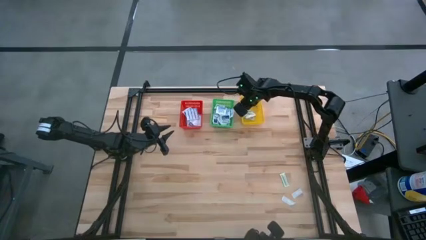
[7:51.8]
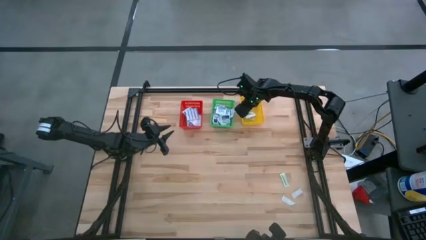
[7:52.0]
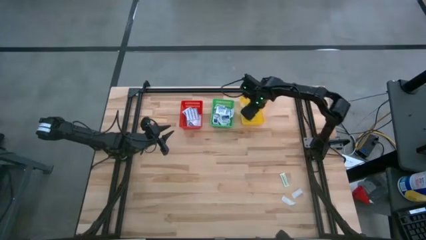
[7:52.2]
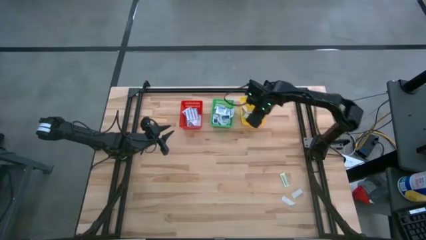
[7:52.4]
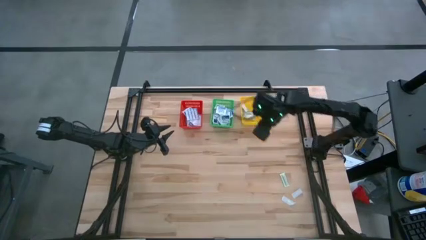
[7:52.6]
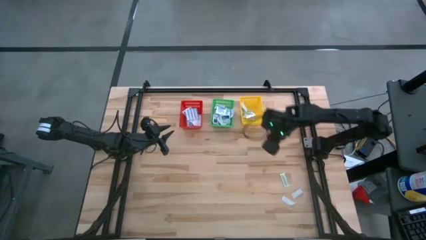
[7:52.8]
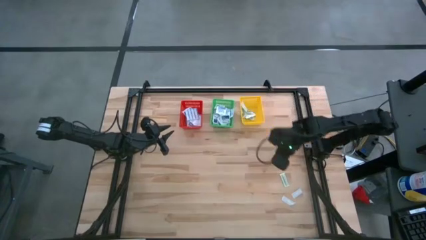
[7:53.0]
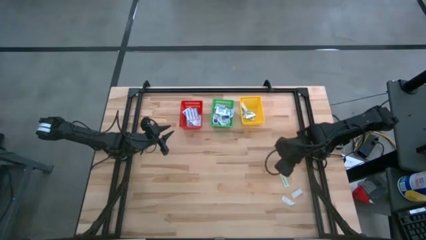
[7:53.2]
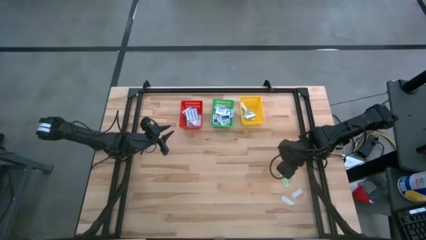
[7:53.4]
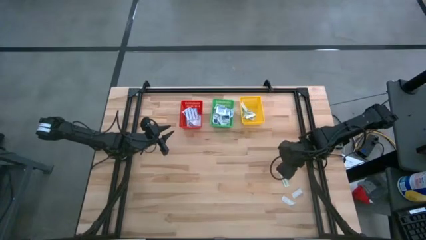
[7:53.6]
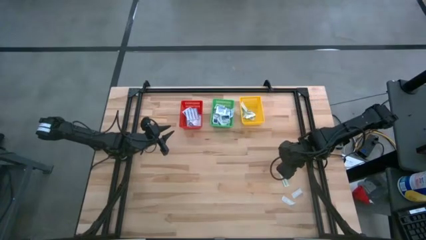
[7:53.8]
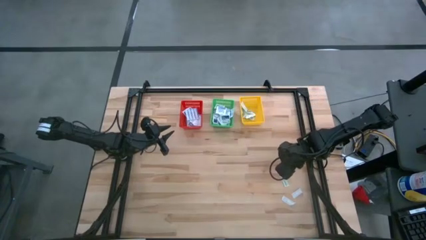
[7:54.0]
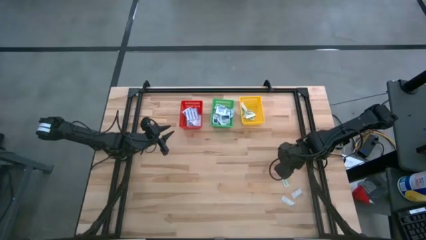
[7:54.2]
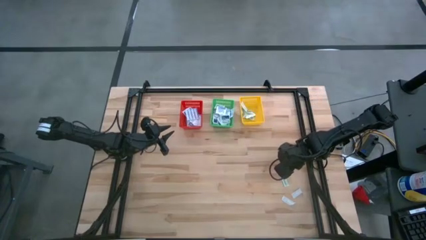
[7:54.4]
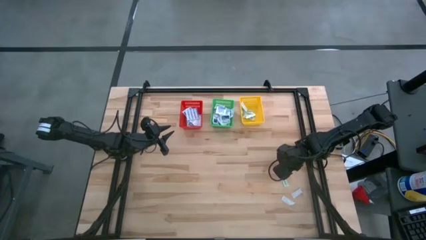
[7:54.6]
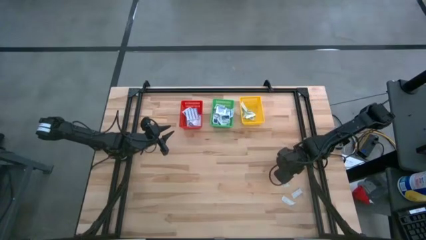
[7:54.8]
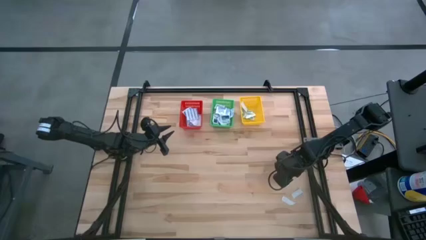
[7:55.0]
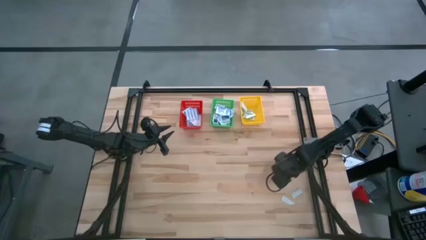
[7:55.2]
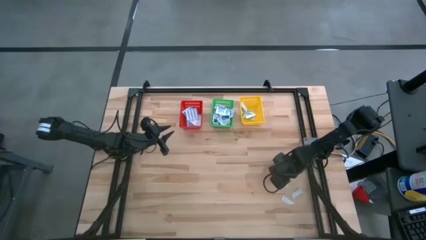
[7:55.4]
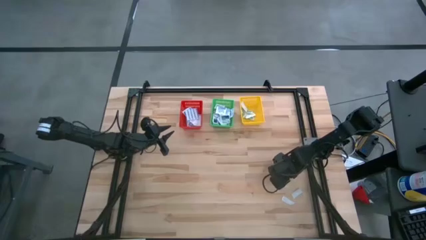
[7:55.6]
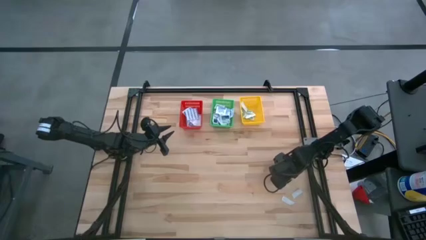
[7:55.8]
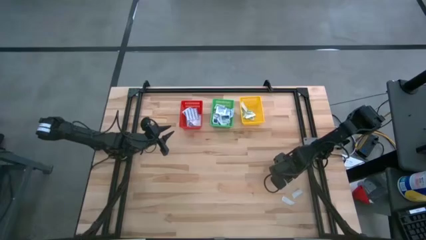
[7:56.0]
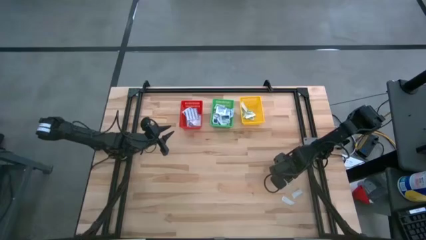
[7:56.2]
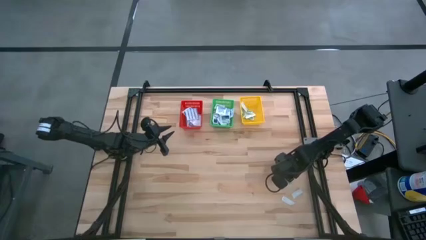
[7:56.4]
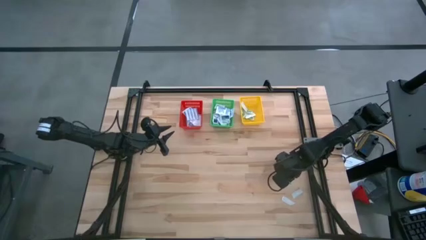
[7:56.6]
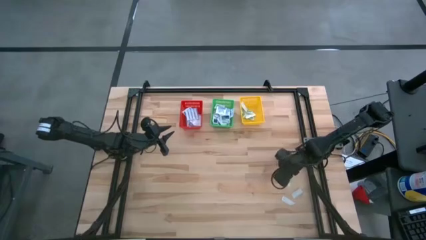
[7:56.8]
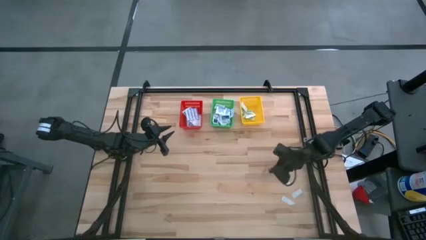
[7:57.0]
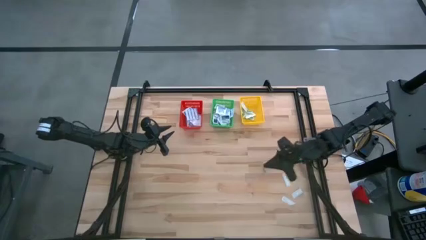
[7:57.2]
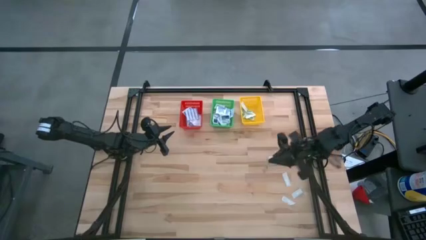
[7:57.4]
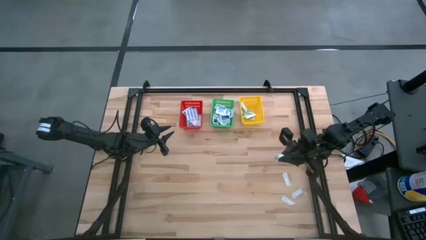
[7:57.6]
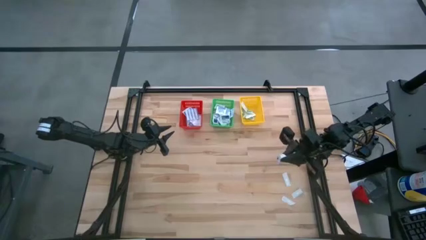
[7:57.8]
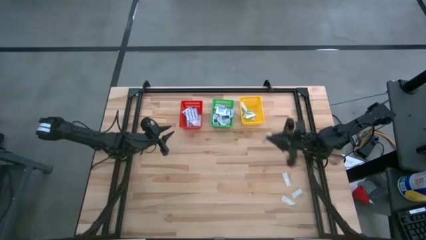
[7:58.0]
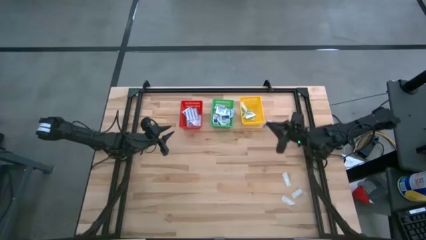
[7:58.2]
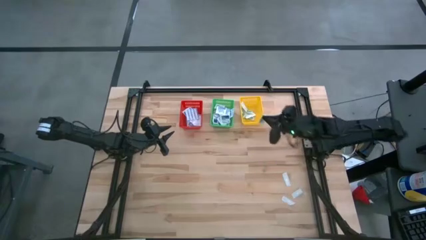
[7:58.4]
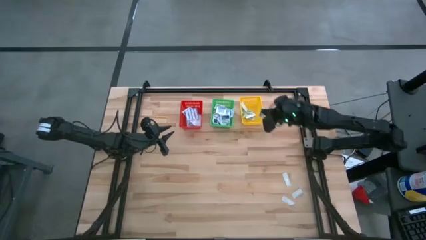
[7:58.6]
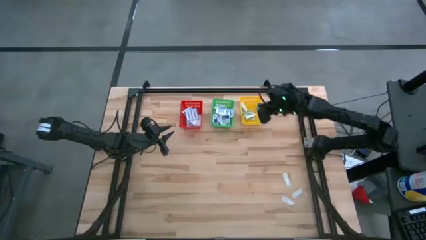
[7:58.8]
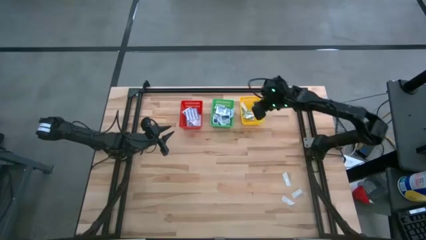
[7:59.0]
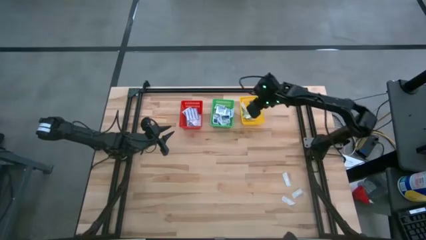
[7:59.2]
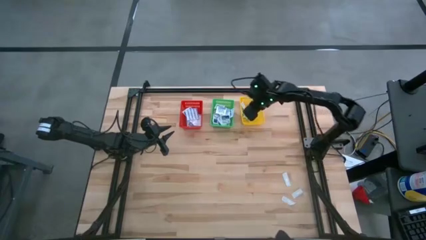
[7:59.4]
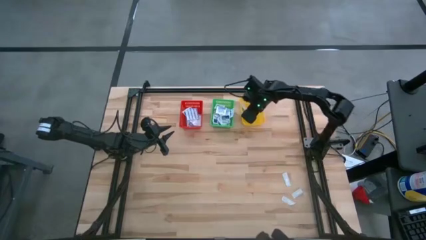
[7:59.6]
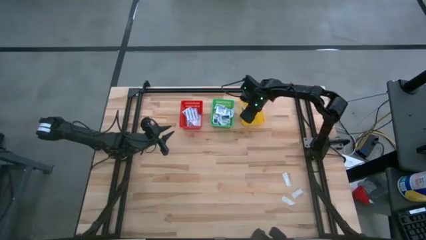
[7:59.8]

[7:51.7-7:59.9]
Task: Pick & Place First Aid Supplies
Put the green bandage into the yellow basket

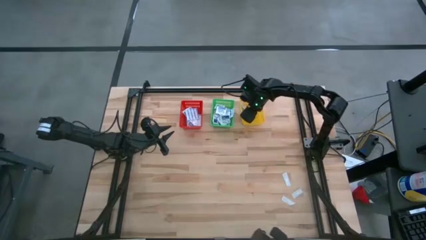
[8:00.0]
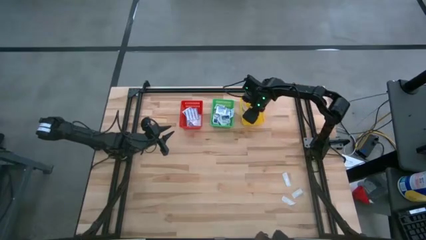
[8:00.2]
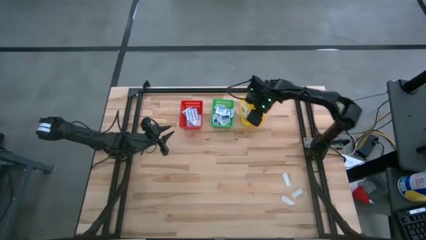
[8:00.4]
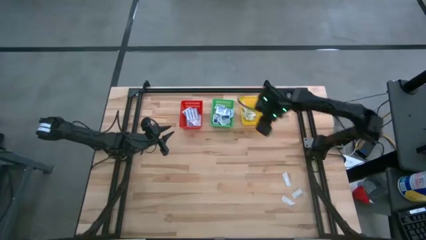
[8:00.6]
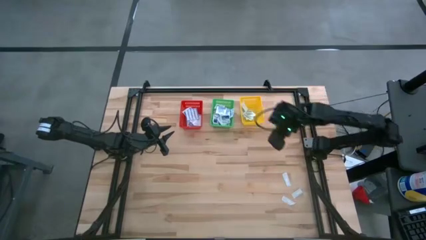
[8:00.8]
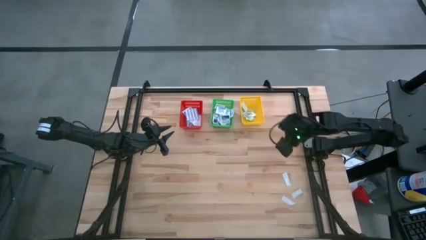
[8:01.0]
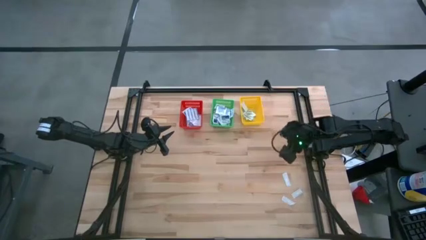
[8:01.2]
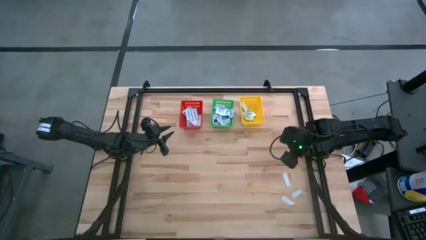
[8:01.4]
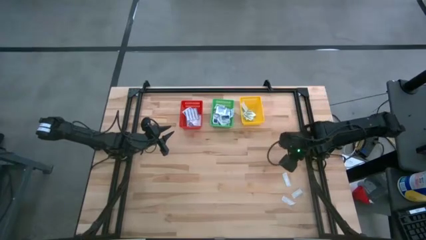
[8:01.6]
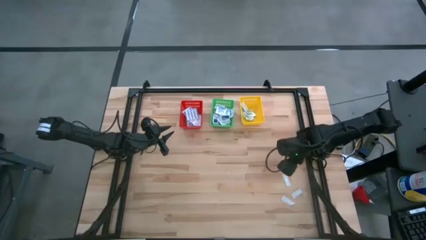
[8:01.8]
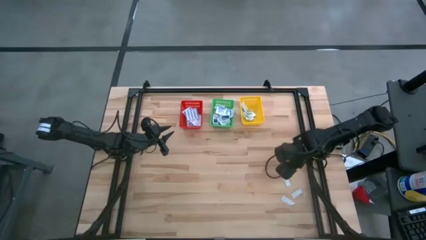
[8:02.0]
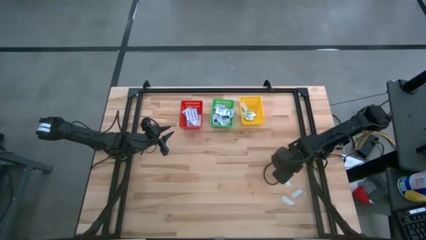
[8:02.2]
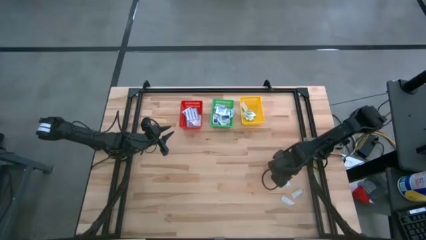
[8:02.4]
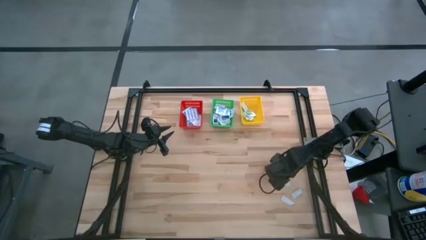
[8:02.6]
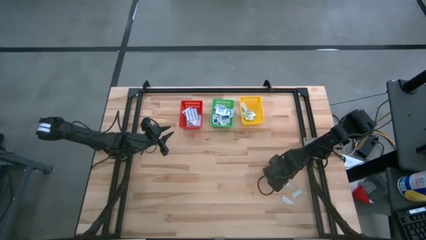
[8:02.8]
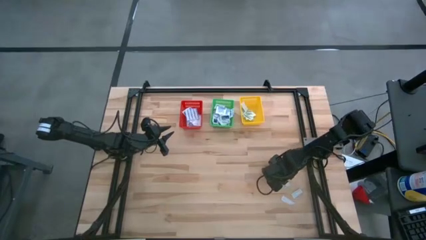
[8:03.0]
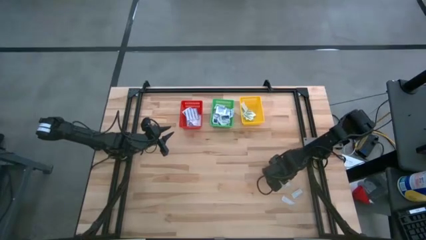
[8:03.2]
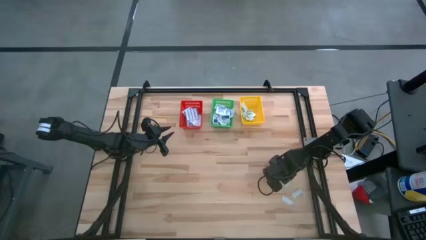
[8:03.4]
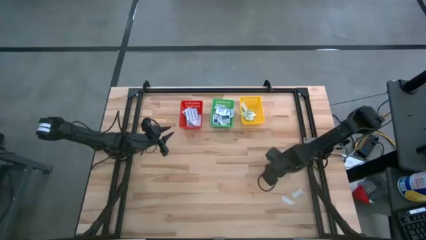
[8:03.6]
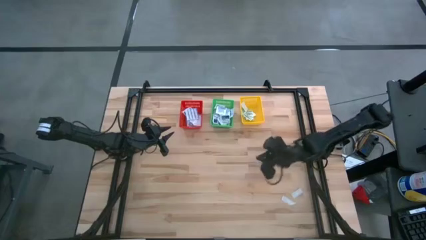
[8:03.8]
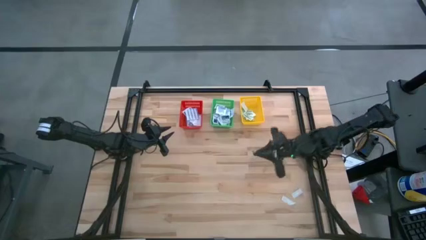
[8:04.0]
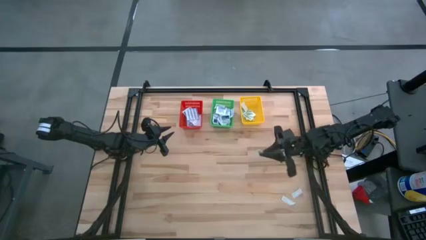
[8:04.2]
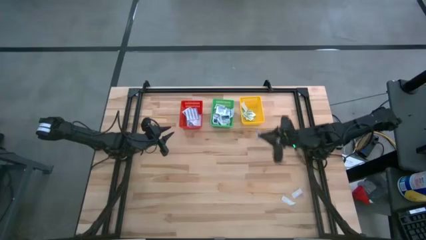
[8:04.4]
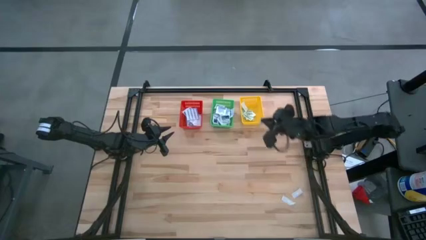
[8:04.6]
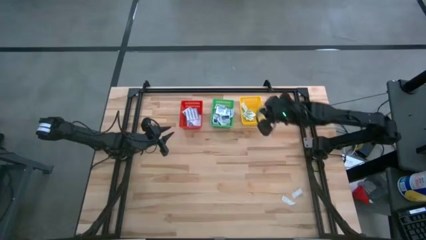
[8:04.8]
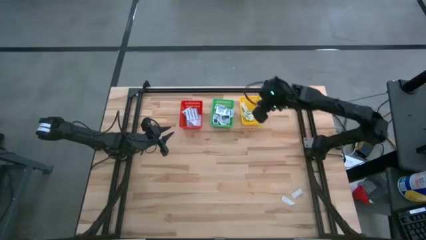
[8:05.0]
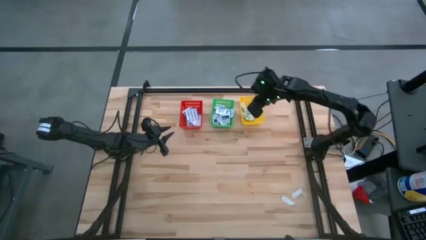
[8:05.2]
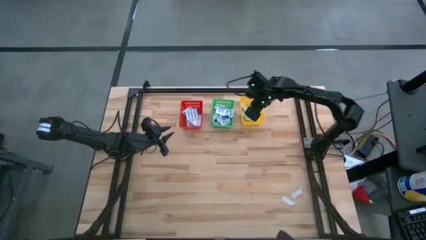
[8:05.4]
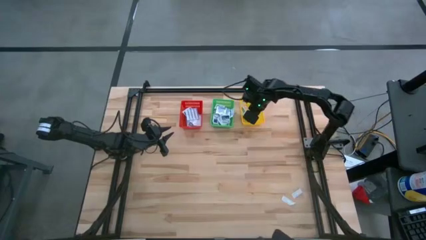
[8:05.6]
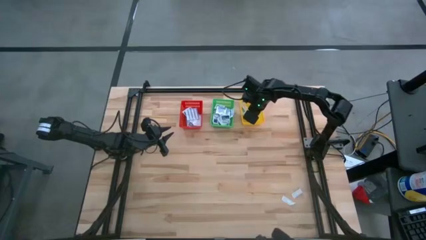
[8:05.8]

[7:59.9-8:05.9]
Put the green bandage into the yellow basket
